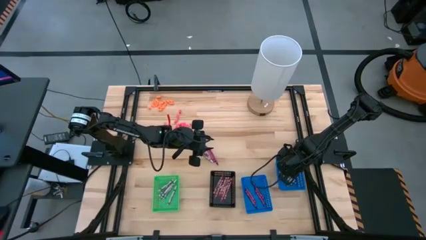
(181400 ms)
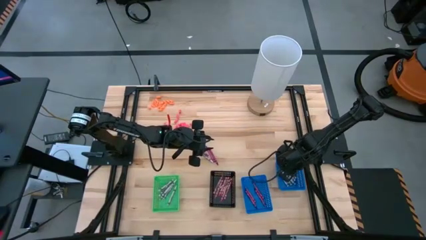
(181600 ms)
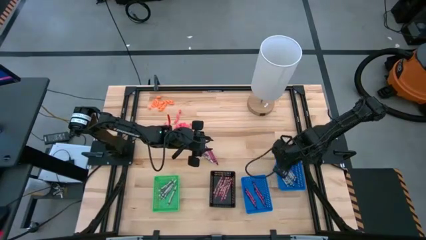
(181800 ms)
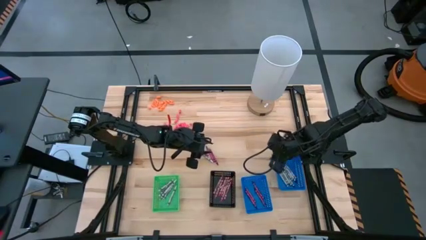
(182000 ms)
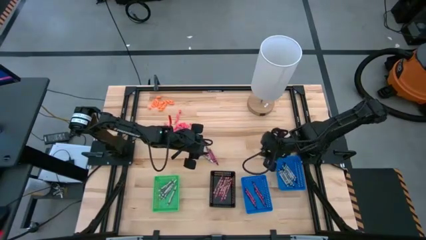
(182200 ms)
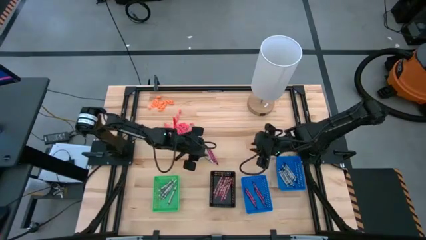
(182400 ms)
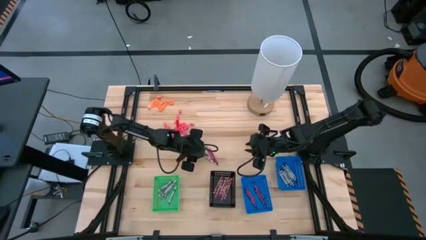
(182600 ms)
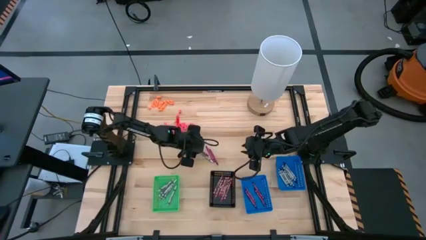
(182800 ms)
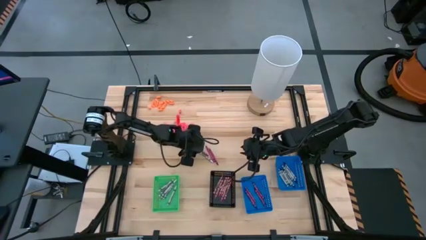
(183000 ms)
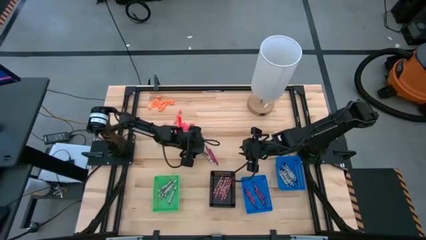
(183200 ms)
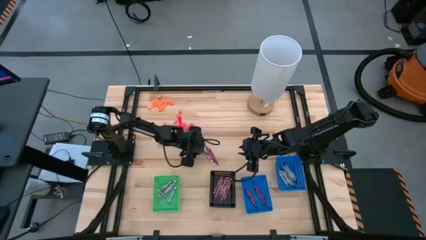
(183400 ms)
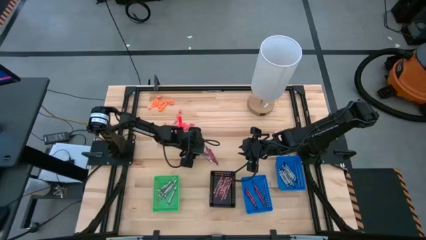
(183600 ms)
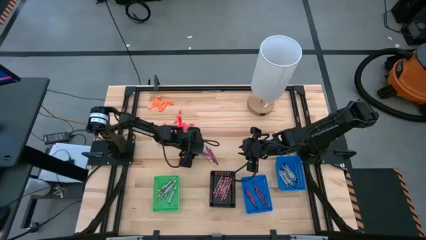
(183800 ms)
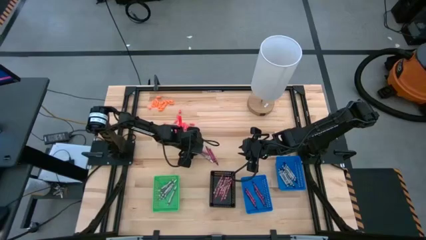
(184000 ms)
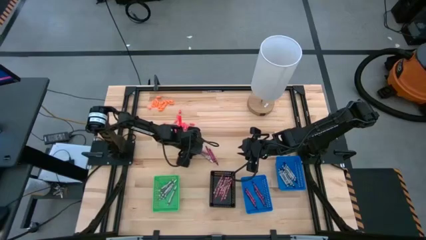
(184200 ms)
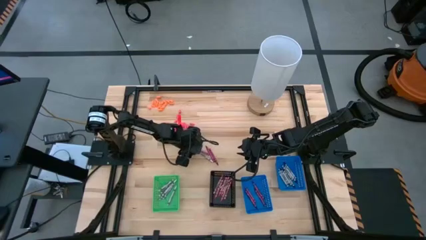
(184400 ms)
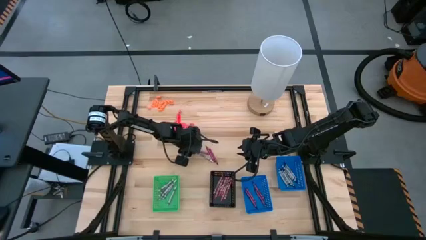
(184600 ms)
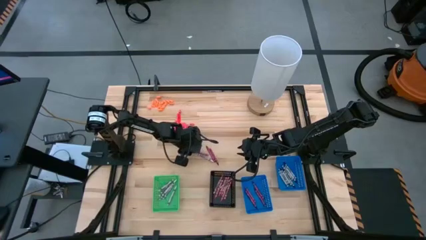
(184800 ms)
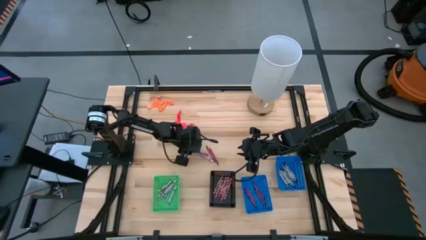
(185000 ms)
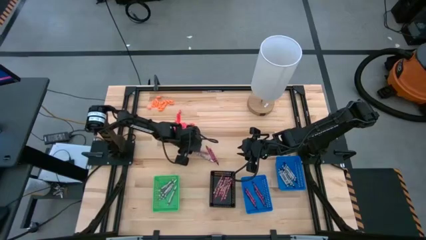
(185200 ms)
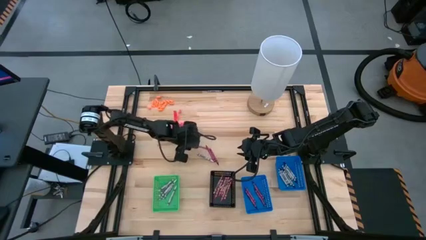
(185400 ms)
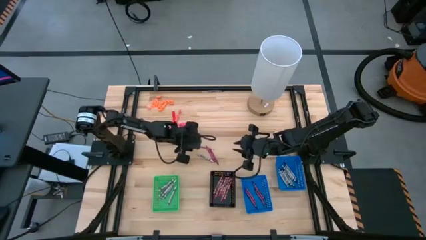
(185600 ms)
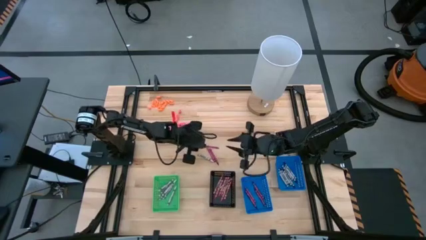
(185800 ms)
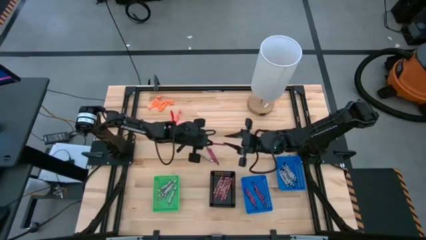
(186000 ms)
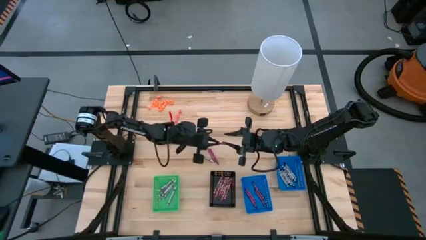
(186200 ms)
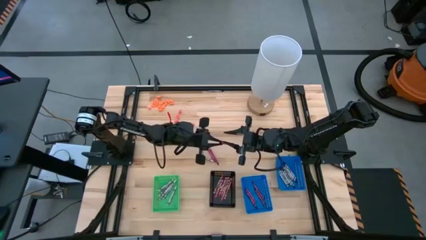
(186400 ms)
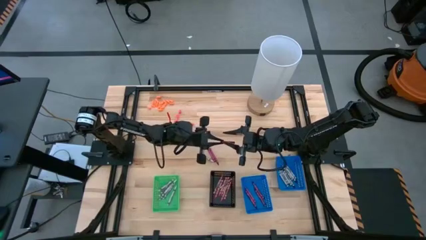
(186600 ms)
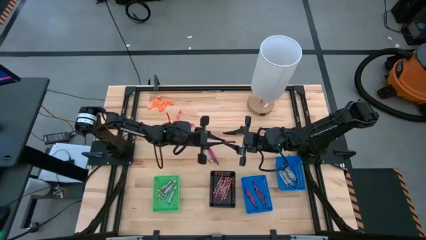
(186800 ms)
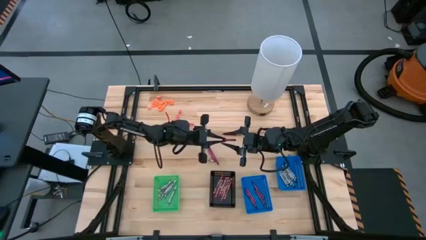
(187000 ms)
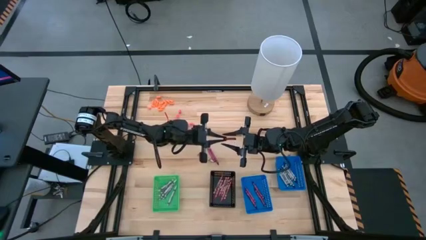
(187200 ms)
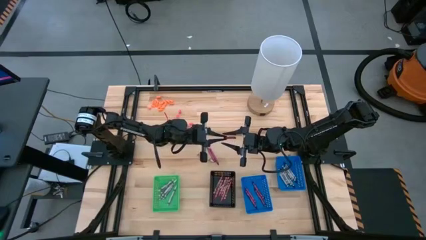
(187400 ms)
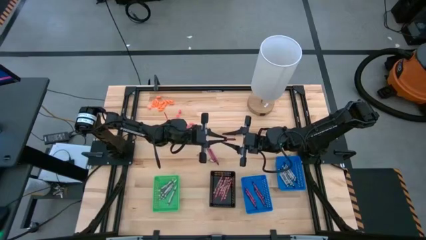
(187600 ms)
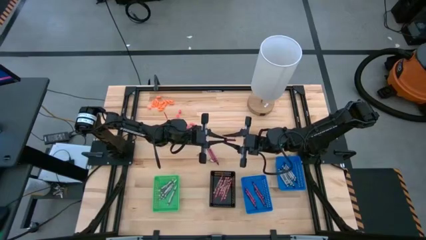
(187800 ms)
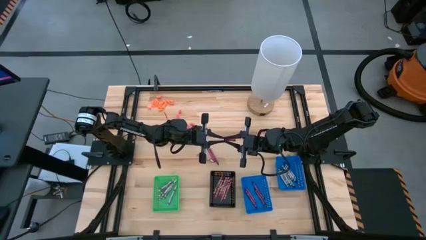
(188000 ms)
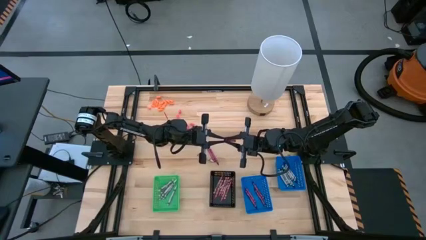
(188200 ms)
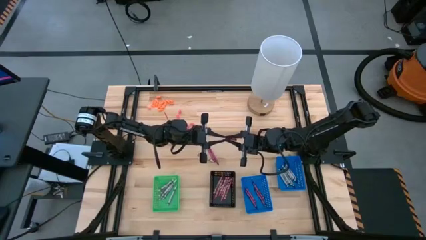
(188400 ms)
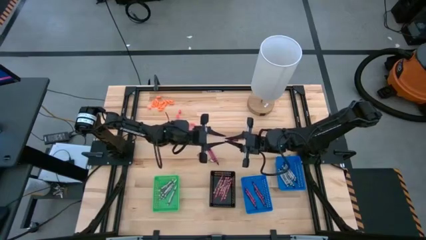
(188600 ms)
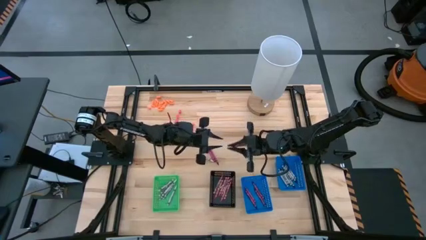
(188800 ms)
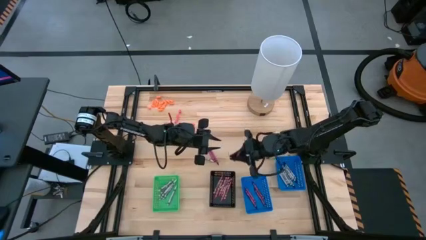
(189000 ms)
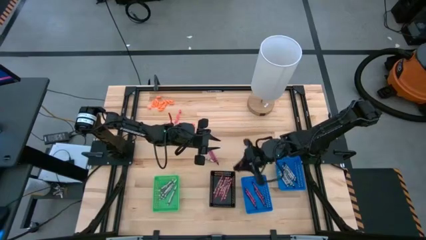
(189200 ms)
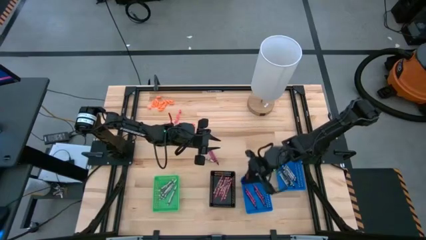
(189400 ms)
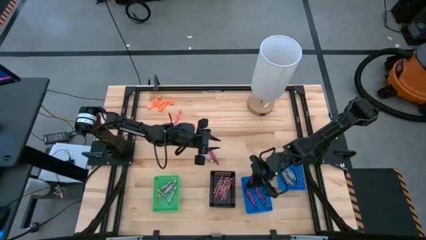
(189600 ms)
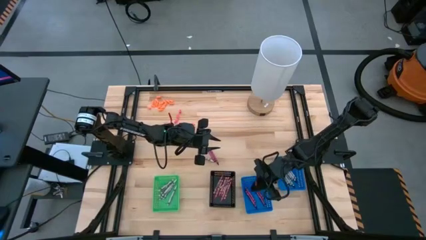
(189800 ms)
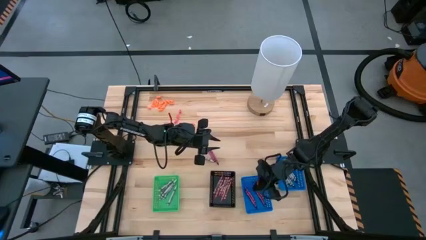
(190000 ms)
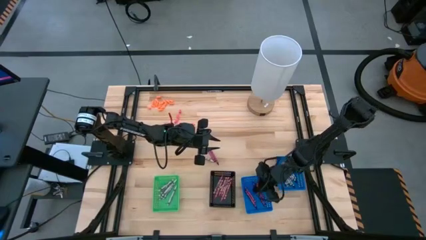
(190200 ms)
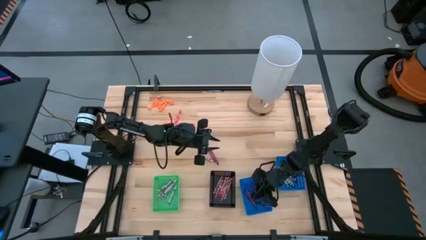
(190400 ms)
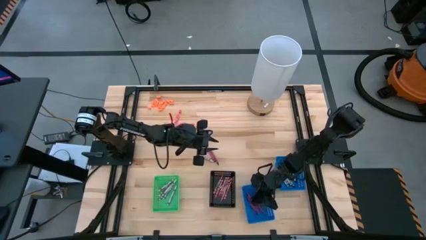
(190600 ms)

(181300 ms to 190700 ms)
Task: Sort crayons
Put the red crayon into the left blue bin

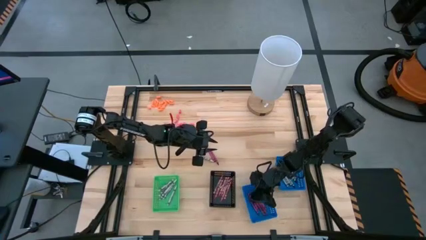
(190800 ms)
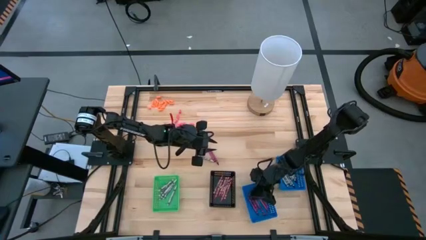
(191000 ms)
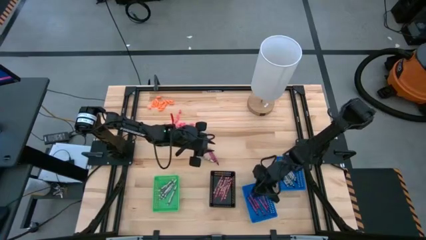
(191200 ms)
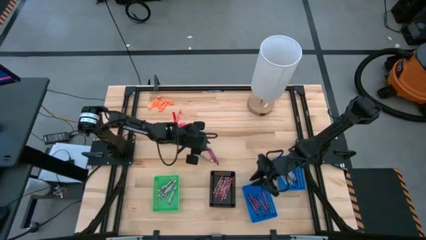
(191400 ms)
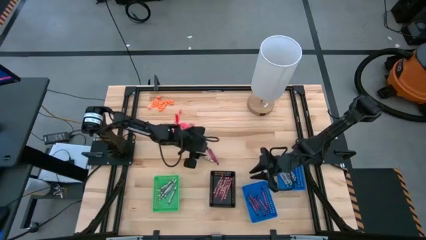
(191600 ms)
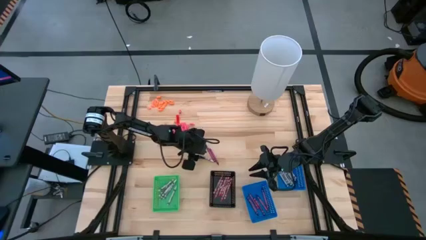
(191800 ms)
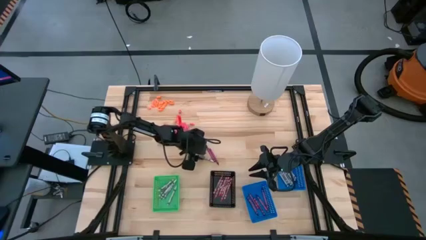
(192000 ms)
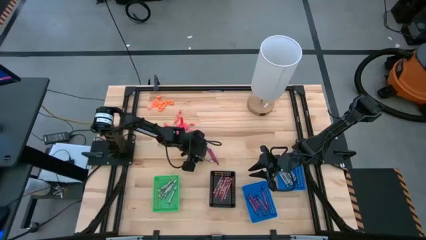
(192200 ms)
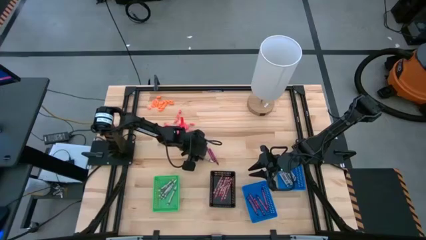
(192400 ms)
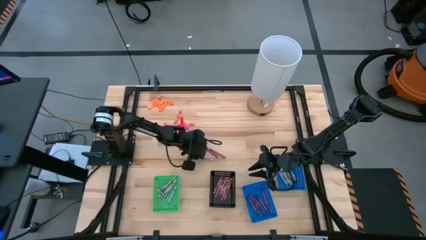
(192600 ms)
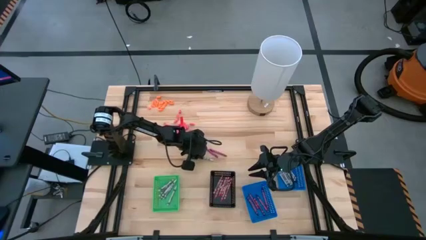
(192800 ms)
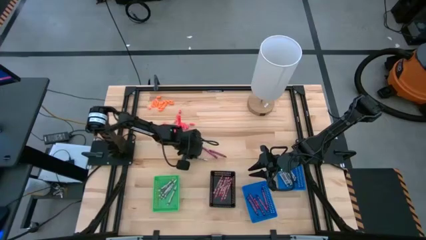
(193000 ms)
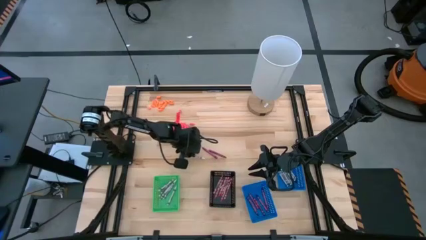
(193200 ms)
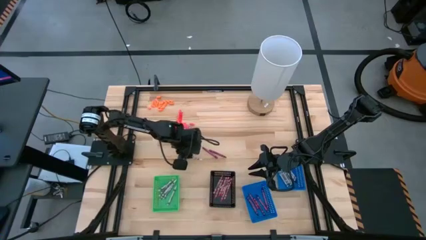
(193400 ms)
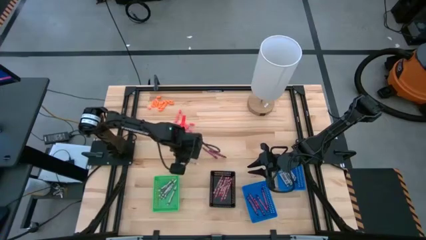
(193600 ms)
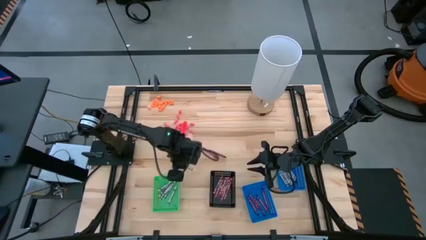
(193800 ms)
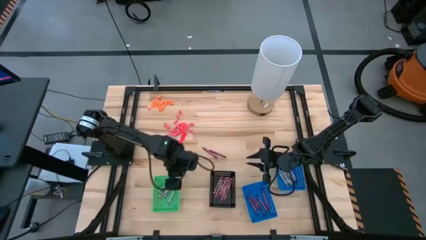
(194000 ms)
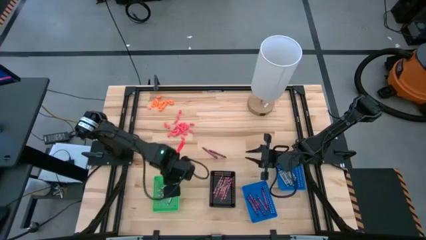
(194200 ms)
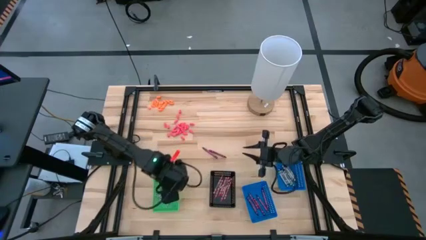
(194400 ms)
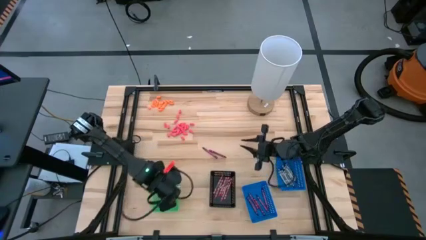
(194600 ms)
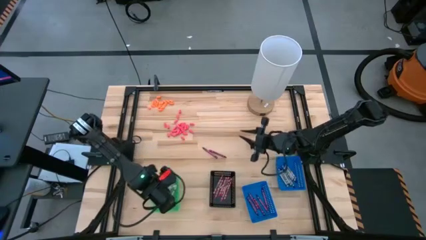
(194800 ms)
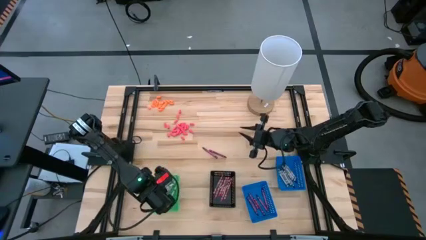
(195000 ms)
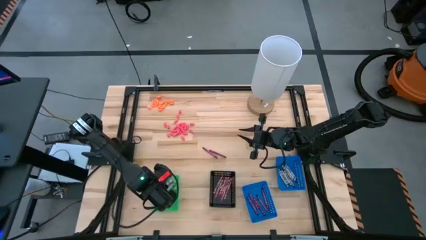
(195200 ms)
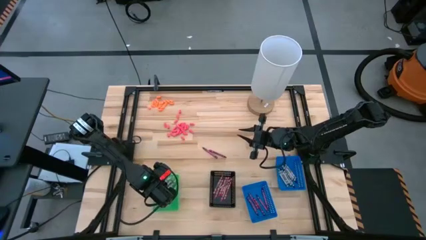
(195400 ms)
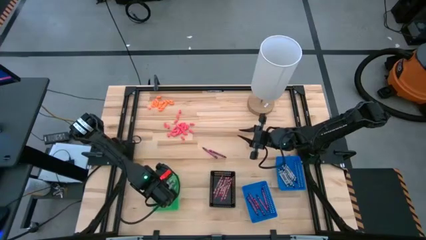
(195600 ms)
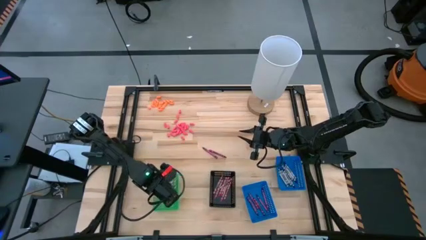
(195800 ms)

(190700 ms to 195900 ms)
Put the white crayon into the green bin

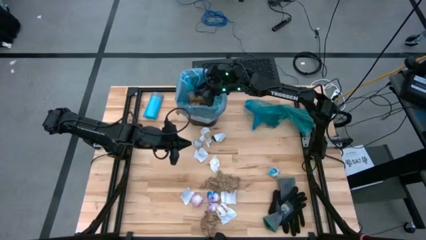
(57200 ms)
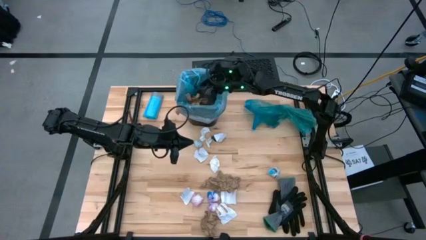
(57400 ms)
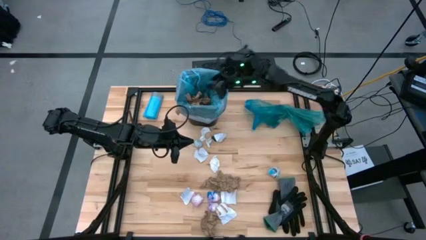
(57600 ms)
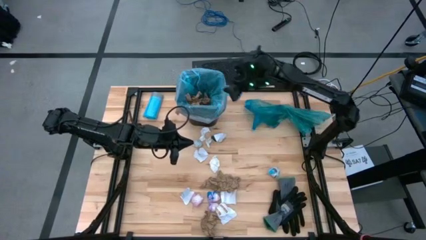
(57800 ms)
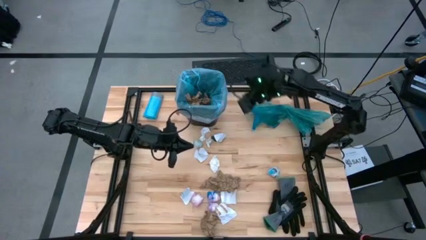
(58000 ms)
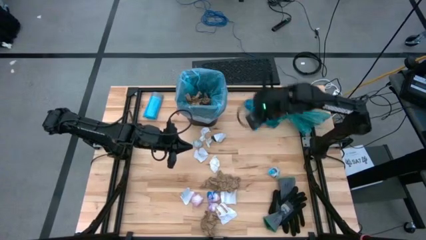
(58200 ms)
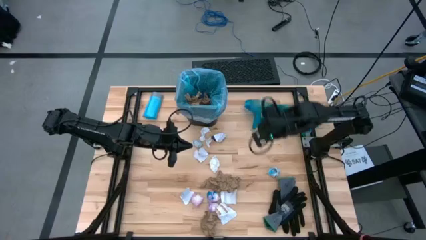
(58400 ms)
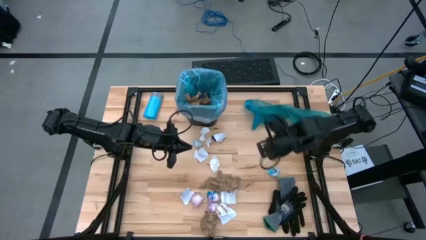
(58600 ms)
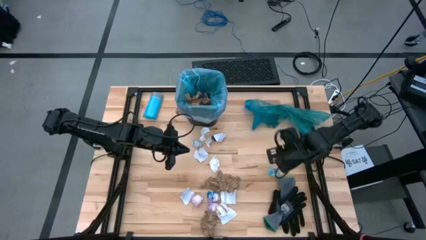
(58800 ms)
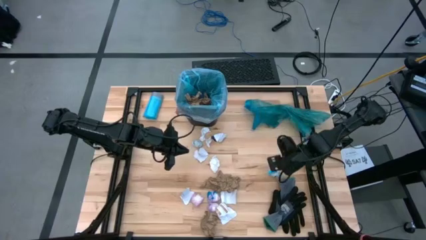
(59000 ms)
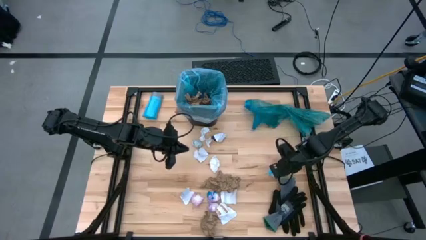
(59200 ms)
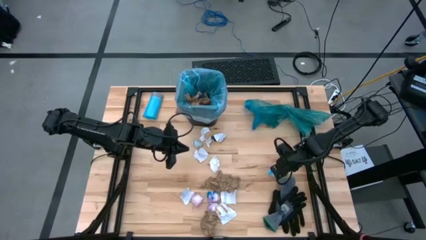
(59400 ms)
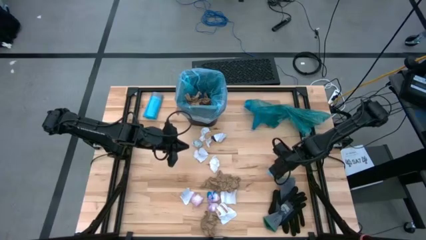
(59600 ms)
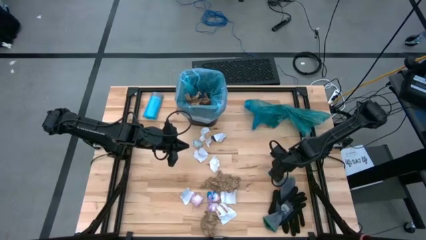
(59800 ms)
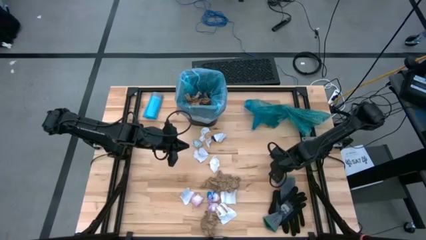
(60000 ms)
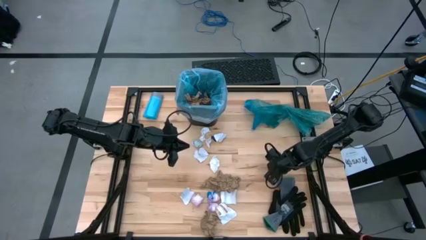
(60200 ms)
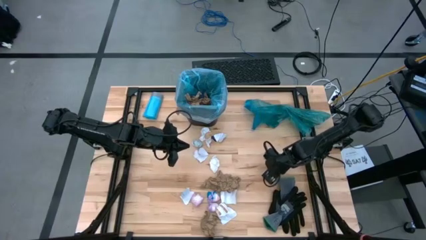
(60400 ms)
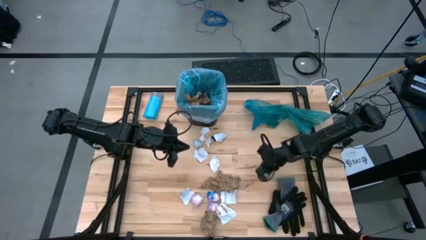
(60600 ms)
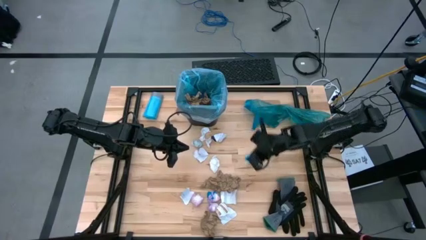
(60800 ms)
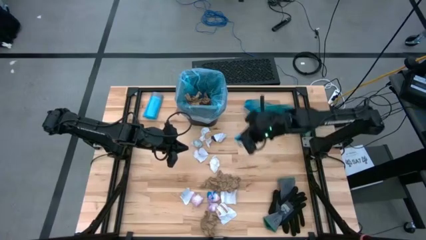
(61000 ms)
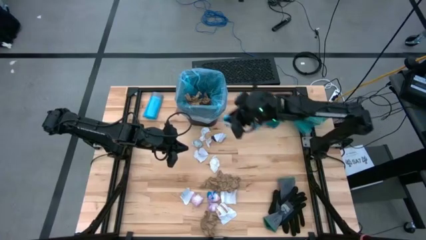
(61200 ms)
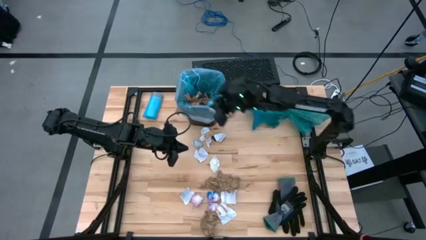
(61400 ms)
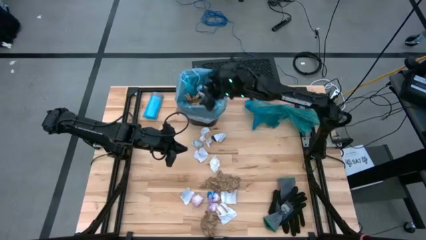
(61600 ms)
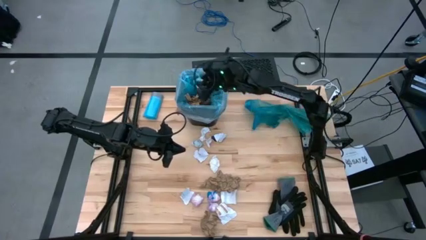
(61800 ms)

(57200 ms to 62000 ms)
Task: place trash/remove bag and relplace
Put the blue plastic trash into the trash bin
